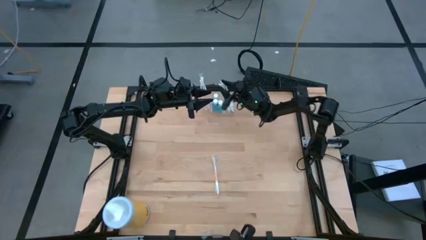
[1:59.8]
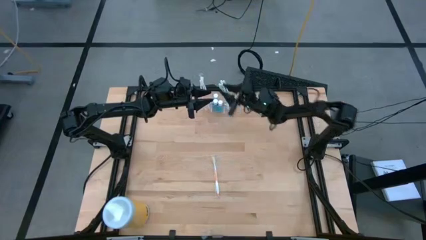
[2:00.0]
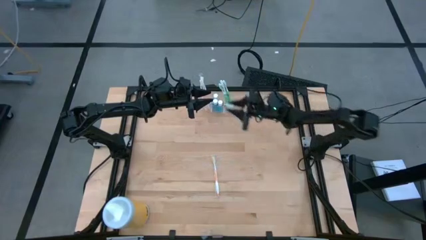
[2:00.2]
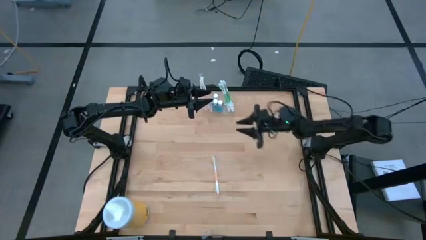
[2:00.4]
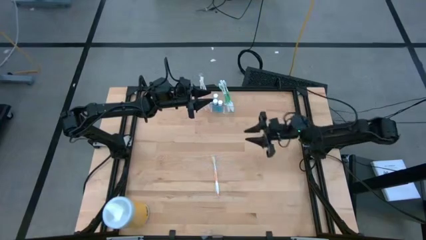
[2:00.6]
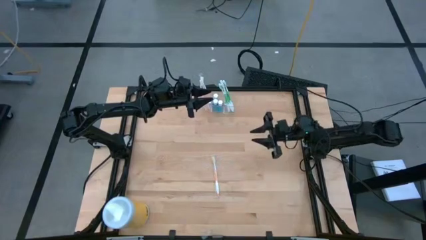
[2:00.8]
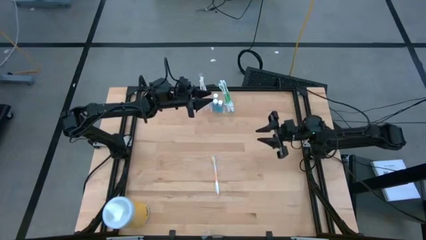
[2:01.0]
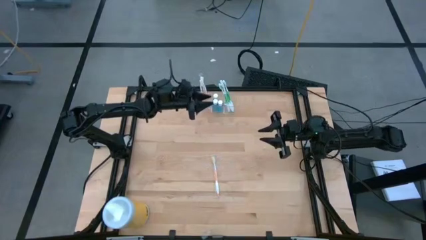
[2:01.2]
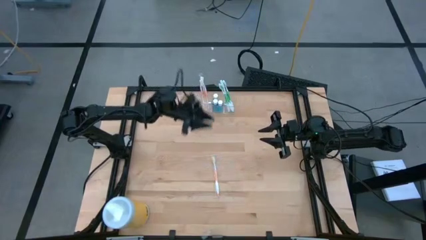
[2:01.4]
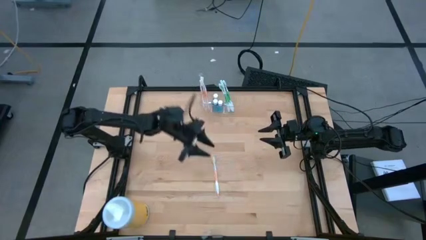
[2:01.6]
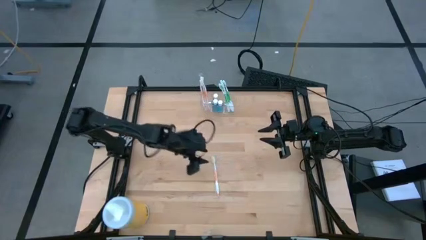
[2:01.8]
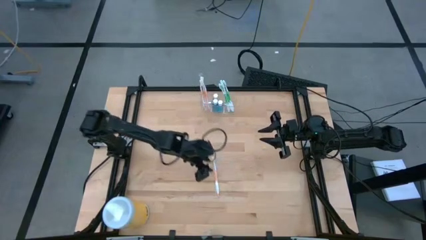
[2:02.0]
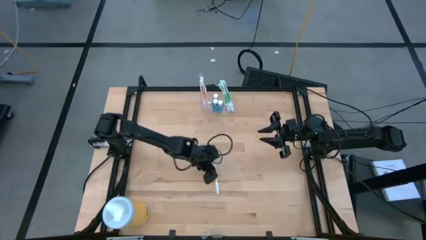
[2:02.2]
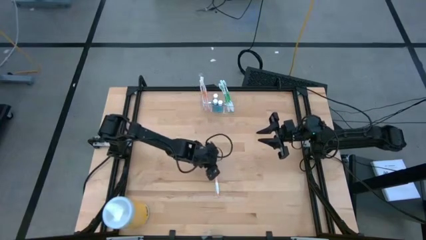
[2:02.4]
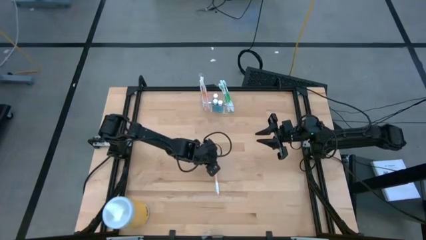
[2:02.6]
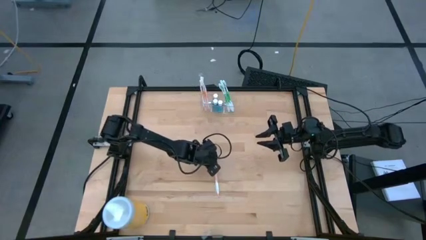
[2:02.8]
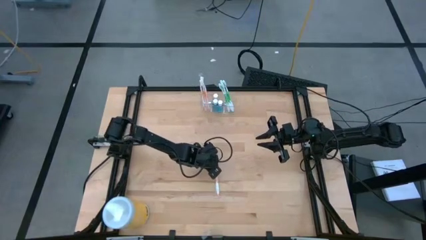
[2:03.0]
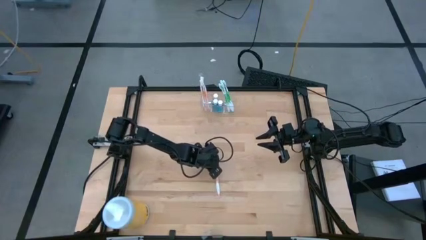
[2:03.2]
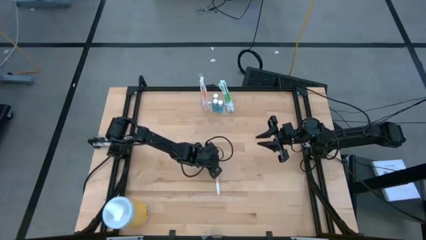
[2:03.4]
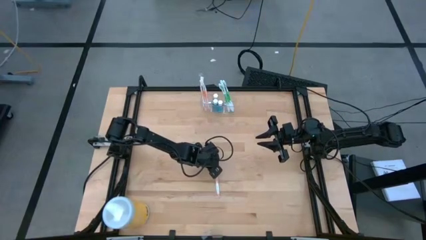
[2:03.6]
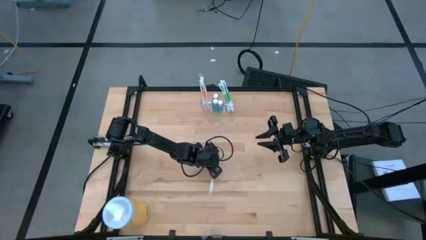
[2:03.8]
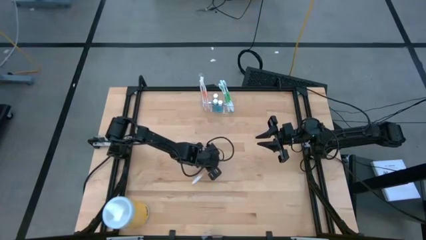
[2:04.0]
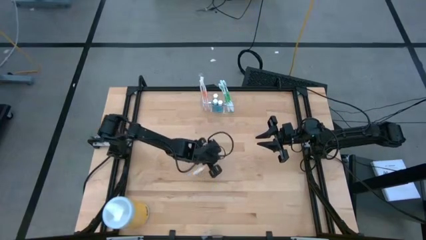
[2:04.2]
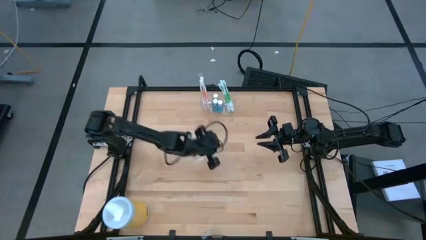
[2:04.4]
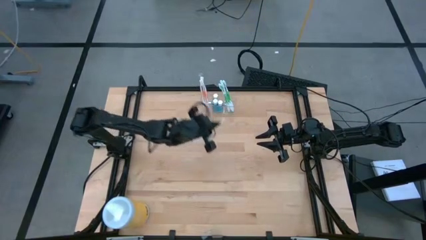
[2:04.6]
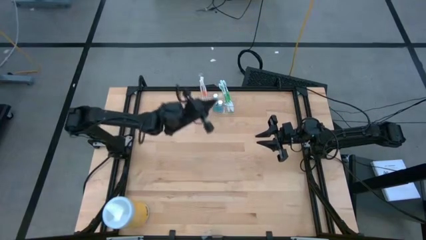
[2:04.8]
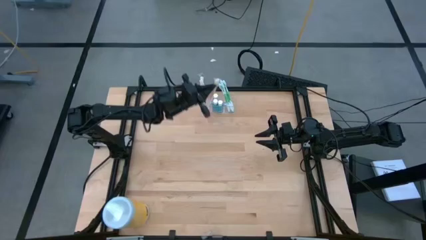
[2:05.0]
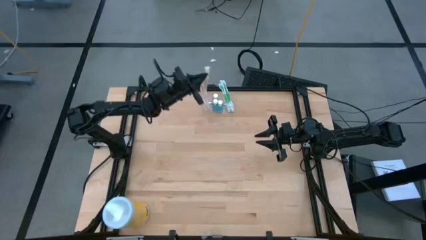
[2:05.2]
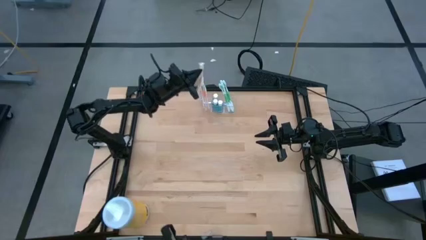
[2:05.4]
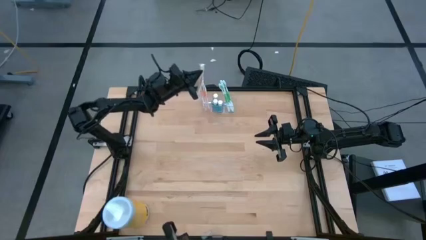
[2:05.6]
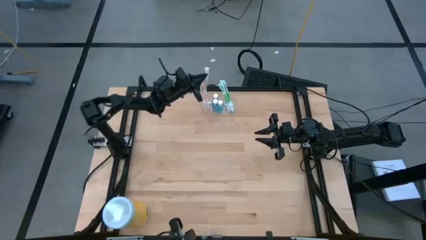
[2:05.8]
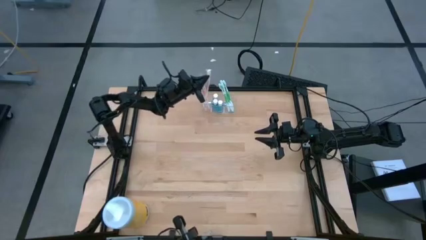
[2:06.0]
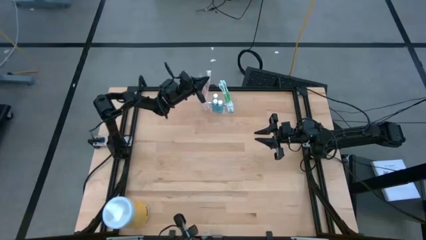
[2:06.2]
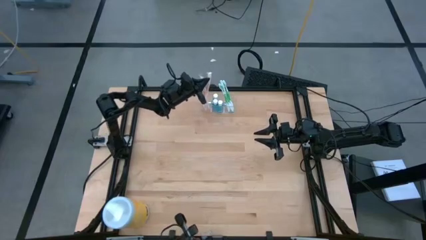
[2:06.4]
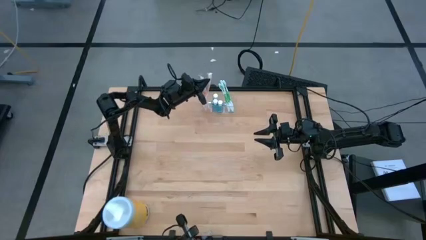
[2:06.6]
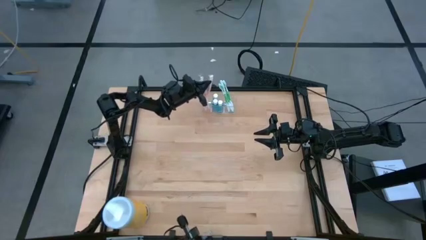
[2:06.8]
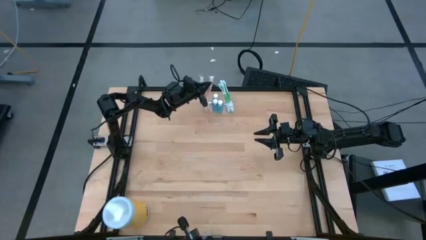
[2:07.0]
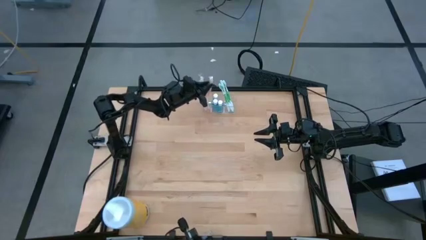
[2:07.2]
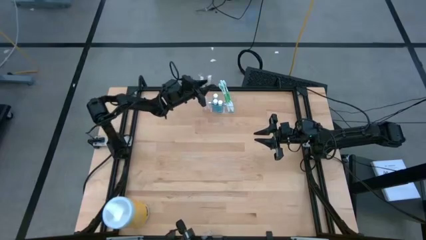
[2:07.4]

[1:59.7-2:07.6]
Task: Pick & Place toothbrushing station
Put the orange toothbrush into the transparent organizer

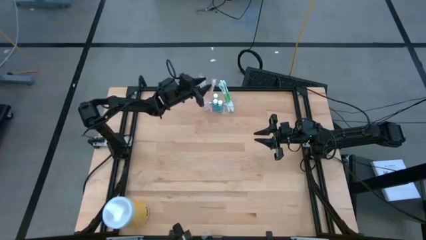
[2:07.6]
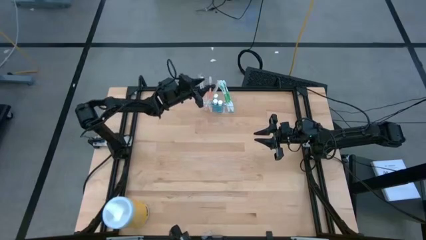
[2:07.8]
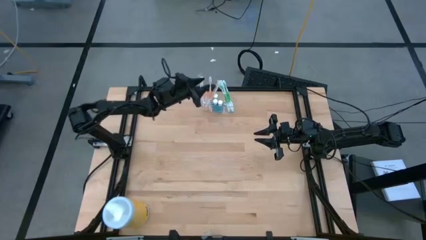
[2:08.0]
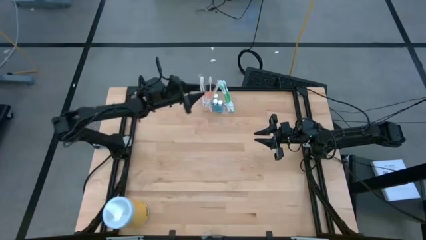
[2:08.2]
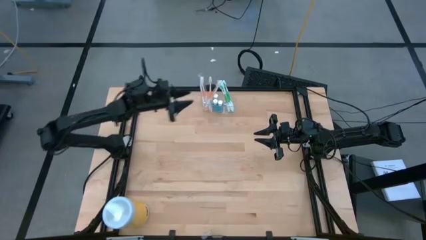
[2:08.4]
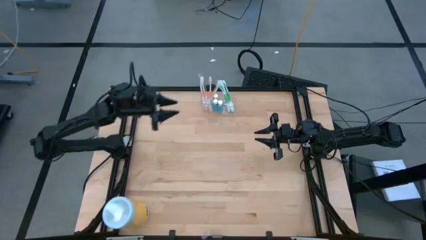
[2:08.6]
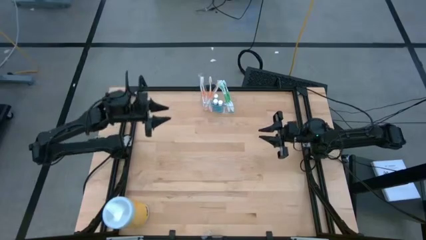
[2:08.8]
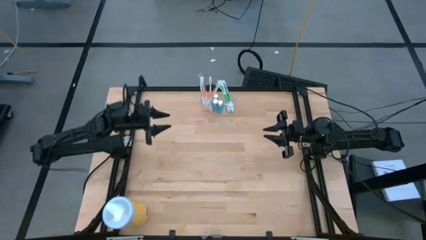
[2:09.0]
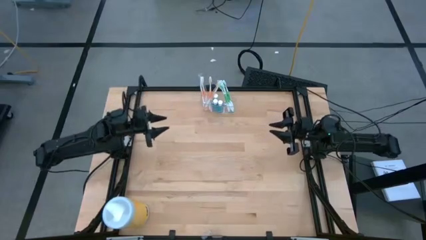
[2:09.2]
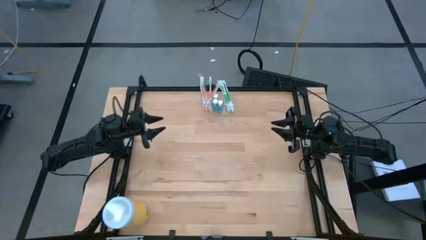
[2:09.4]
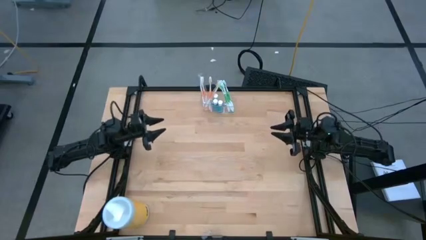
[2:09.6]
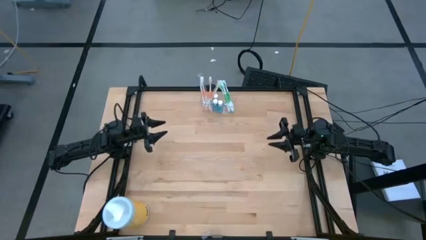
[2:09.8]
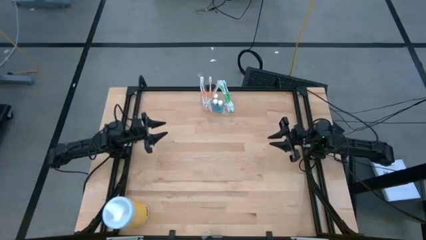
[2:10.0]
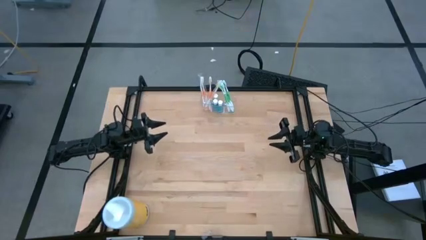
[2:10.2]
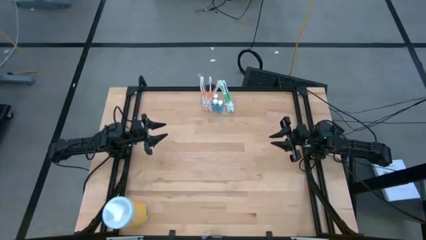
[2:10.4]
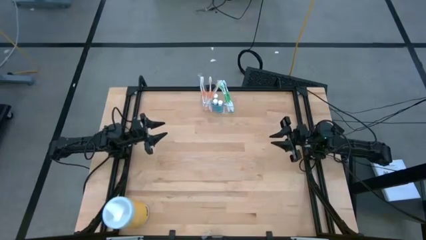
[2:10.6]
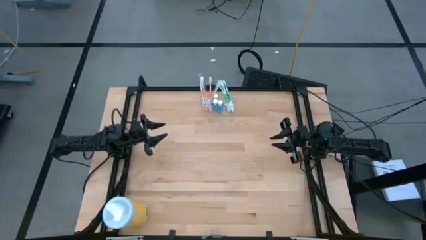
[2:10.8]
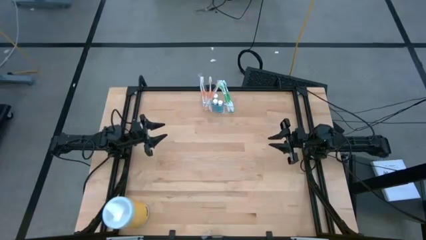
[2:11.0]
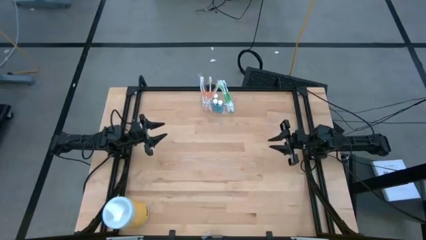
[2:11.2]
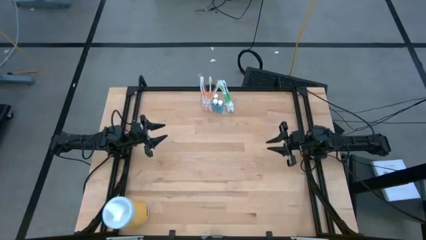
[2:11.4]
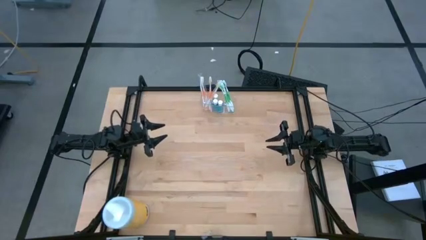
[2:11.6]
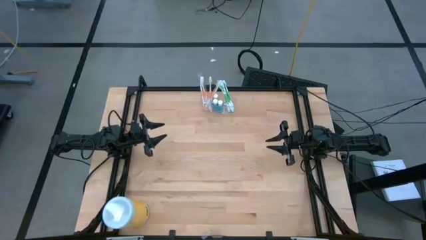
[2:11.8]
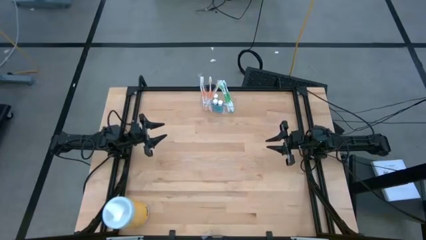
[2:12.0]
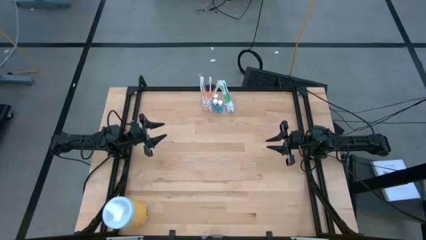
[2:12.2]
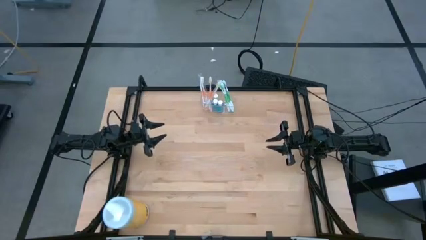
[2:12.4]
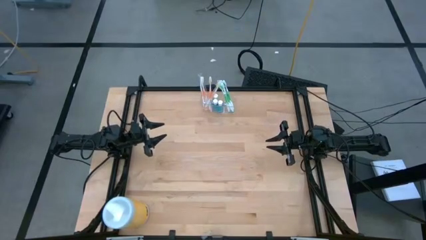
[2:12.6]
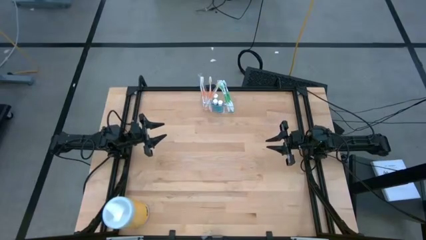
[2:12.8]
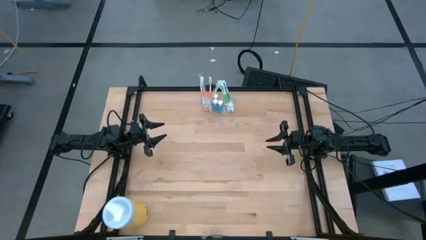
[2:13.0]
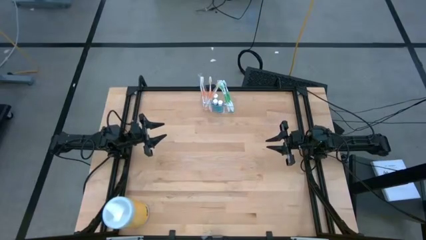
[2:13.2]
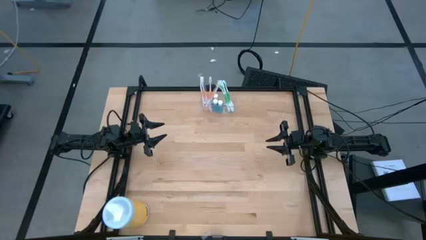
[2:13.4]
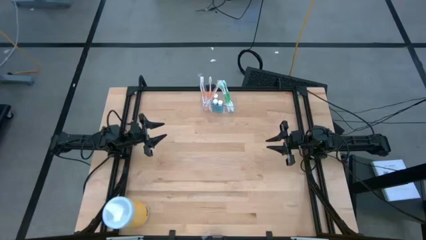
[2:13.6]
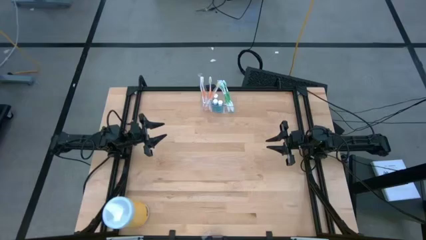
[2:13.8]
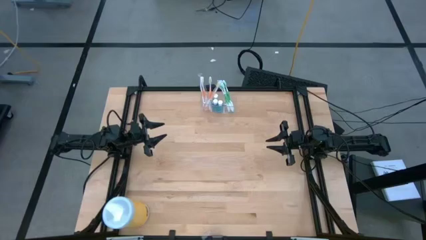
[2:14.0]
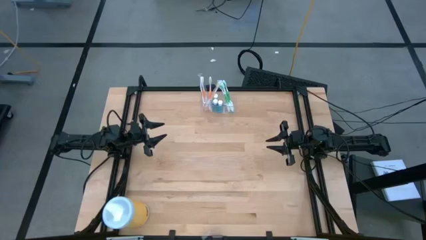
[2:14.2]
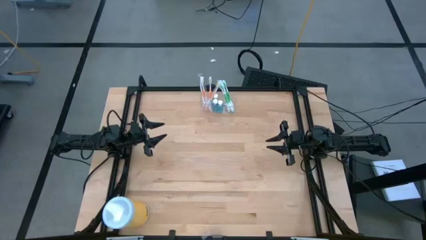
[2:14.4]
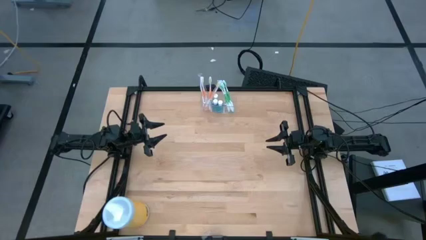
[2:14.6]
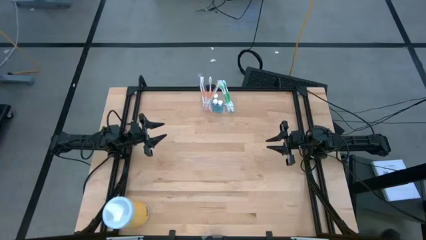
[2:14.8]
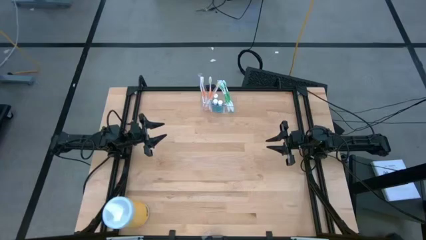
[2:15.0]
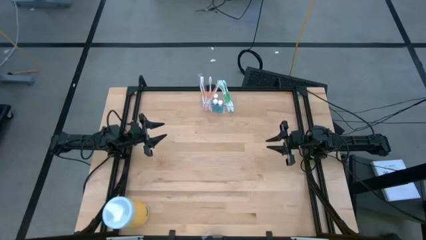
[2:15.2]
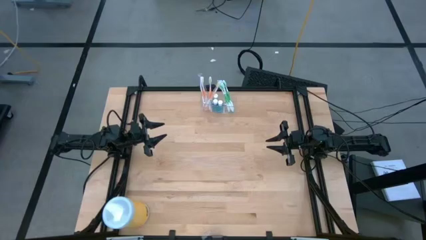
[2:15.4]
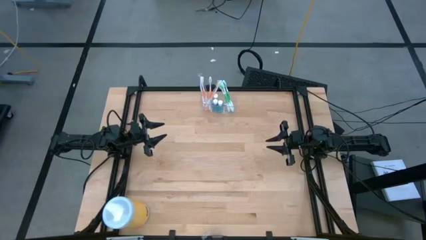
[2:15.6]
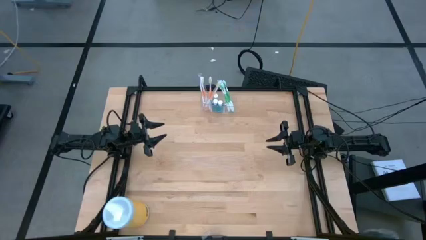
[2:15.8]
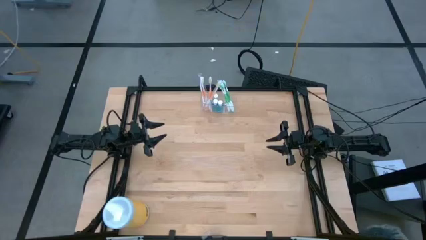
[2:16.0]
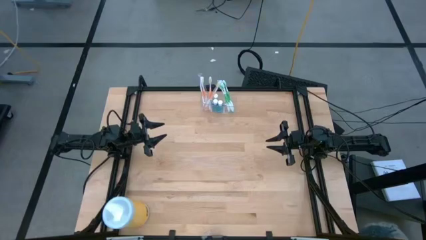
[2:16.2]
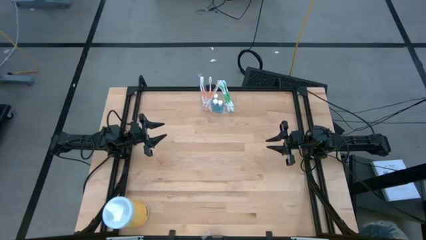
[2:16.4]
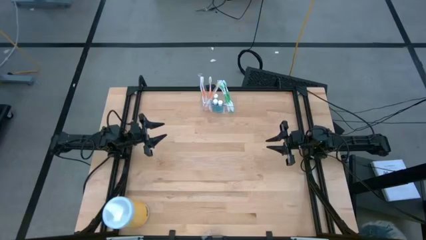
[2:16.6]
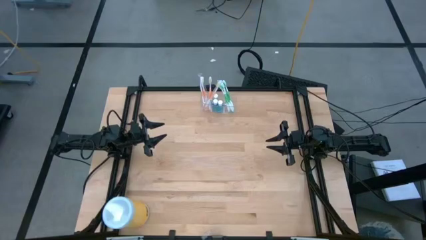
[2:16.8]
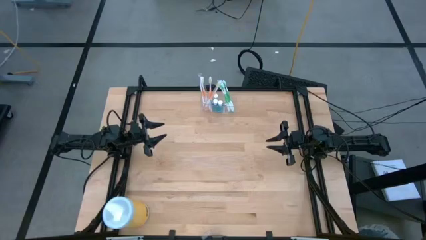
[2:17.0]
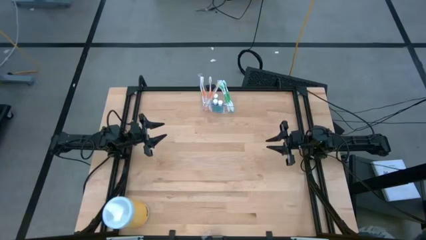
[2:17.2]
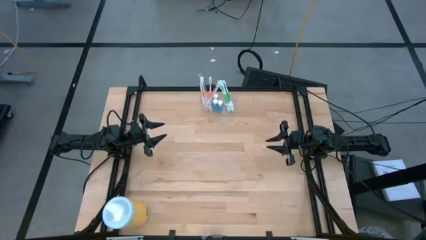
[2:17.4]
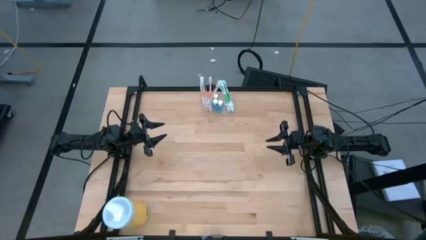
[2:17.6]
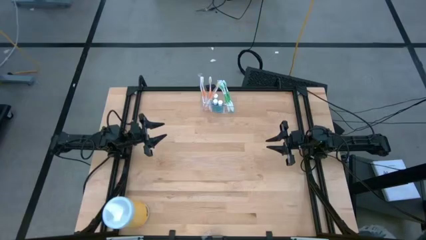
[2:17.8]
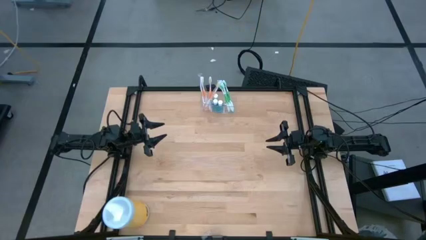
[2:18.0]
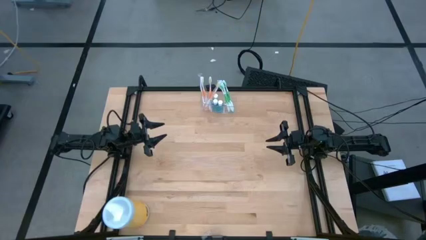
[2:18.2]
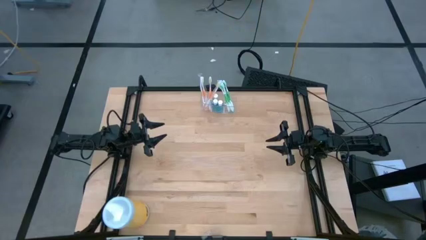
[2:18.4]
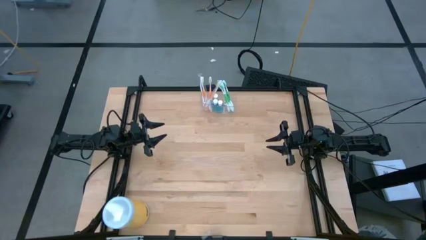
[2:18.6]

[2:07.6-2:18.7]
Return to Home Position
